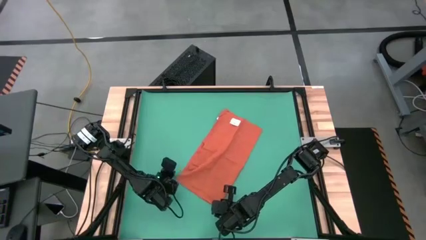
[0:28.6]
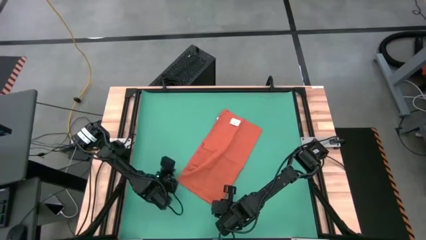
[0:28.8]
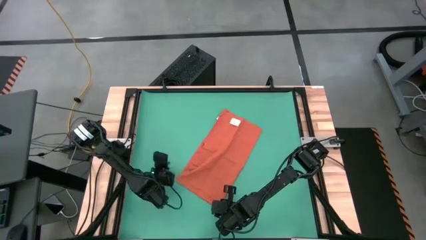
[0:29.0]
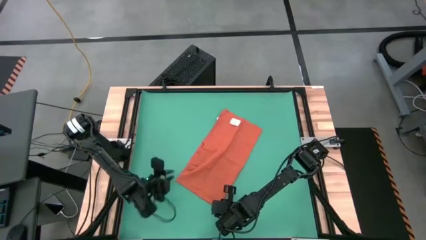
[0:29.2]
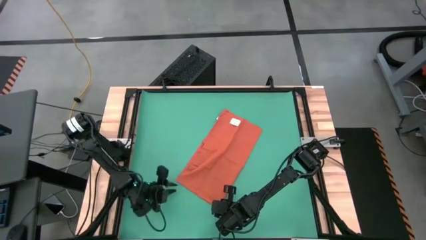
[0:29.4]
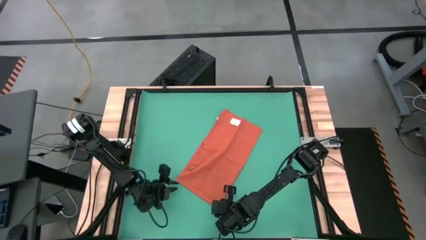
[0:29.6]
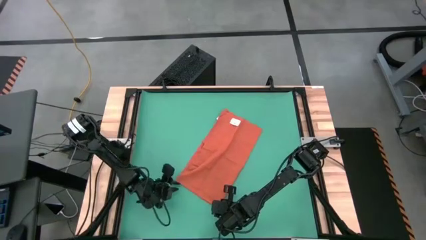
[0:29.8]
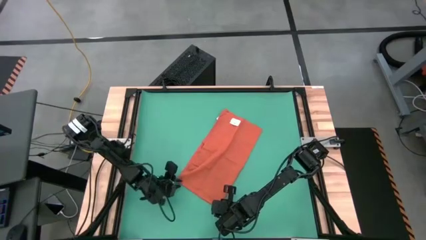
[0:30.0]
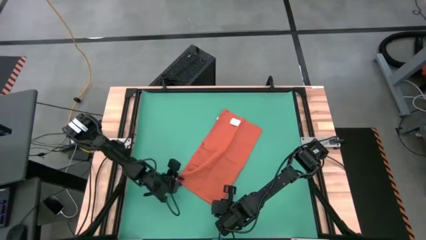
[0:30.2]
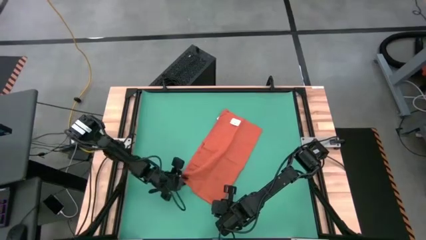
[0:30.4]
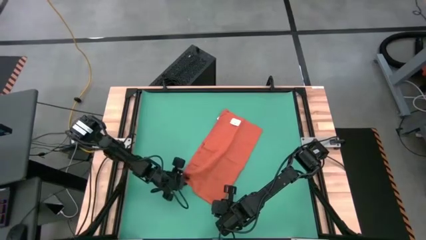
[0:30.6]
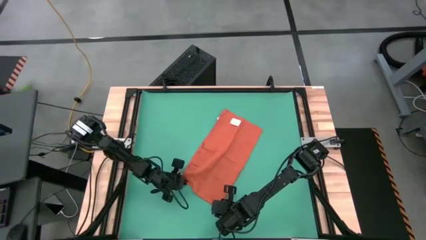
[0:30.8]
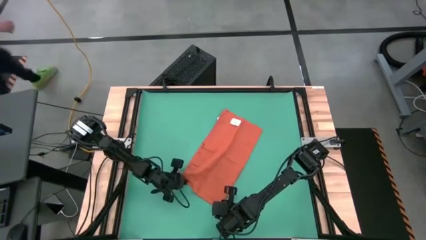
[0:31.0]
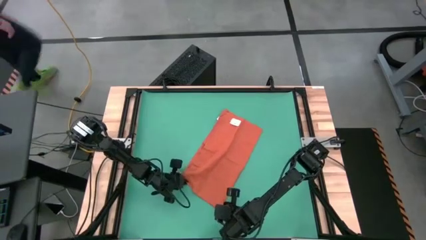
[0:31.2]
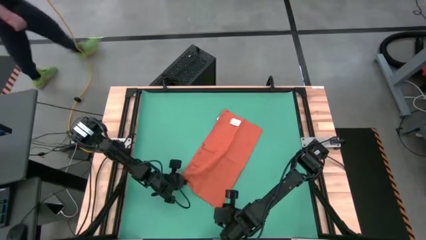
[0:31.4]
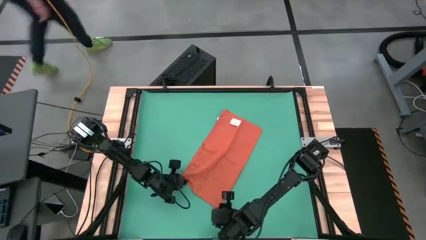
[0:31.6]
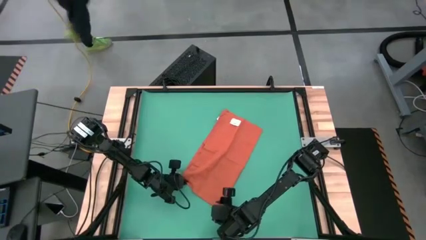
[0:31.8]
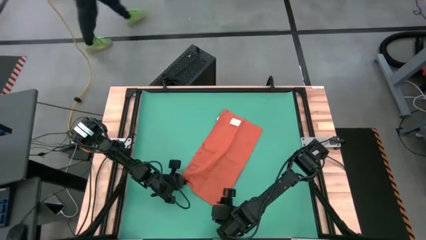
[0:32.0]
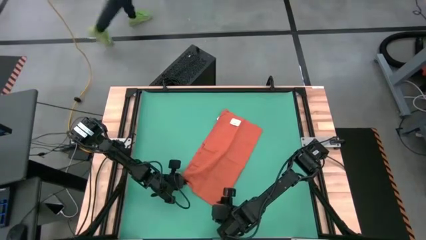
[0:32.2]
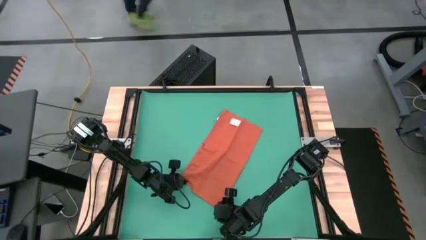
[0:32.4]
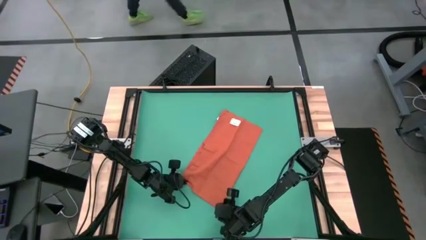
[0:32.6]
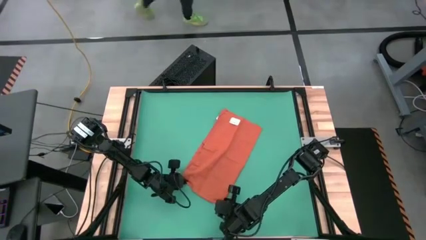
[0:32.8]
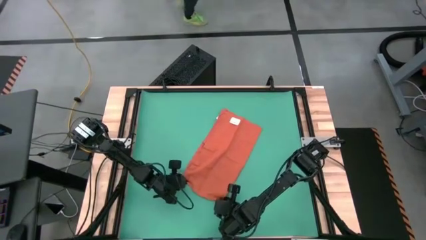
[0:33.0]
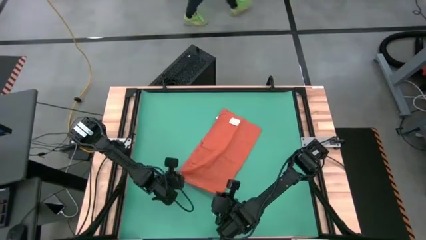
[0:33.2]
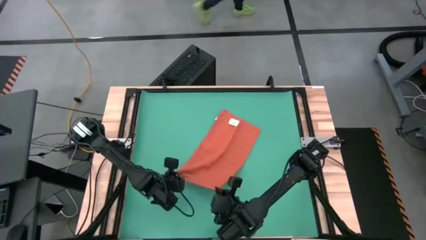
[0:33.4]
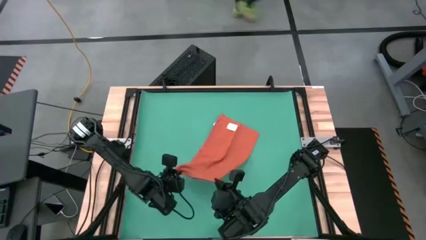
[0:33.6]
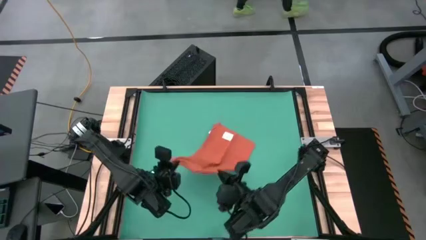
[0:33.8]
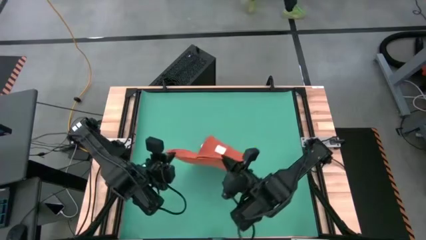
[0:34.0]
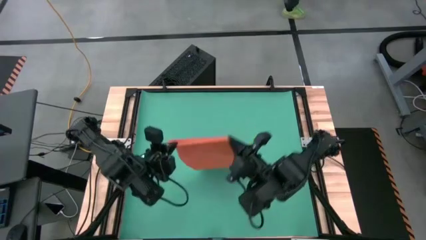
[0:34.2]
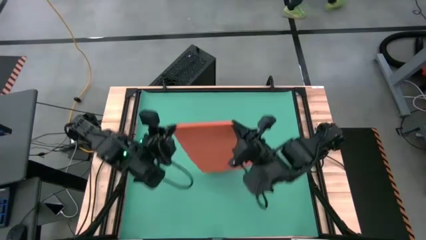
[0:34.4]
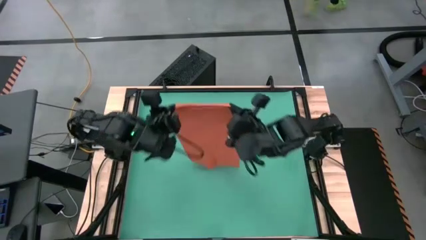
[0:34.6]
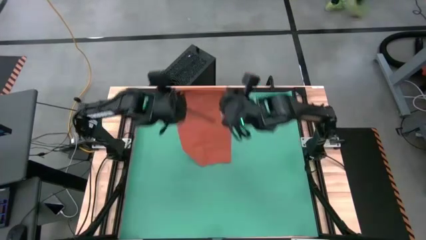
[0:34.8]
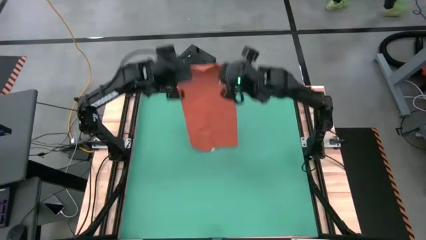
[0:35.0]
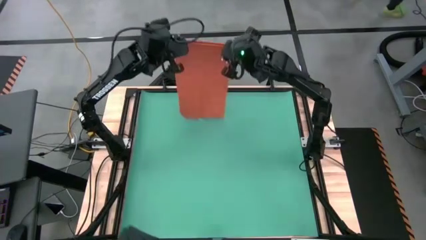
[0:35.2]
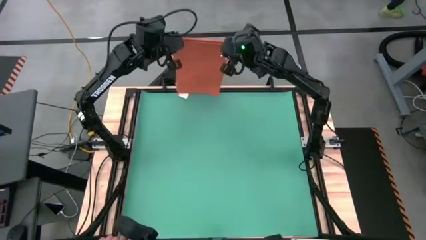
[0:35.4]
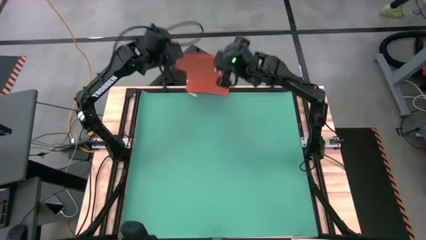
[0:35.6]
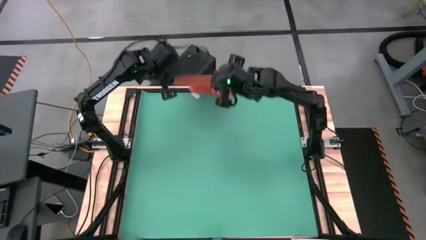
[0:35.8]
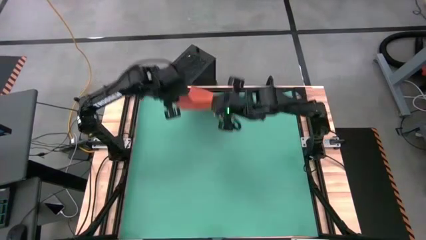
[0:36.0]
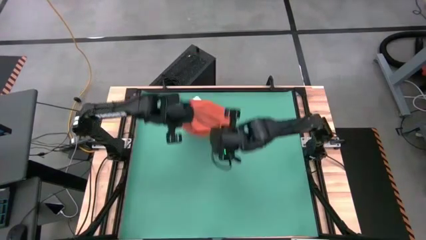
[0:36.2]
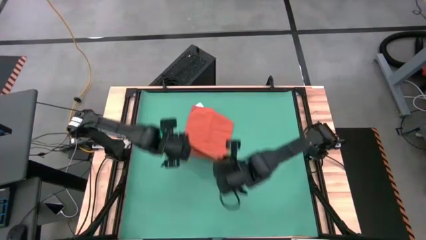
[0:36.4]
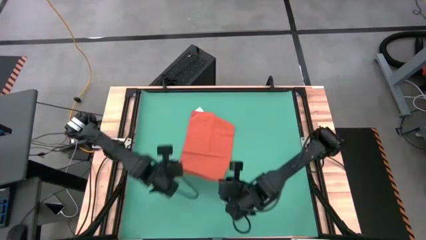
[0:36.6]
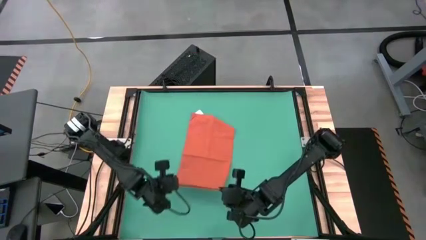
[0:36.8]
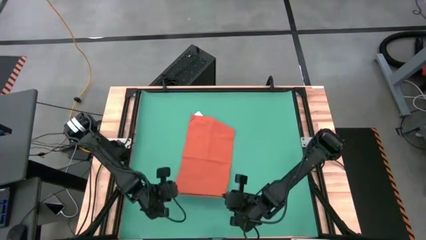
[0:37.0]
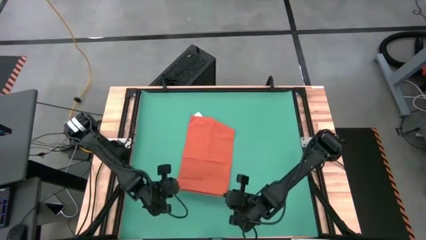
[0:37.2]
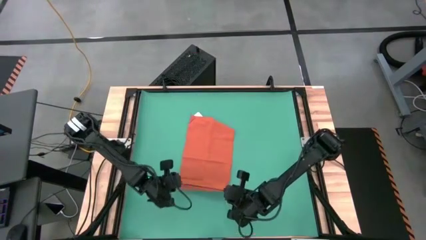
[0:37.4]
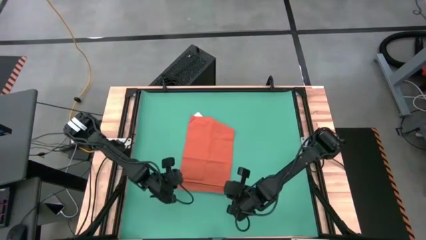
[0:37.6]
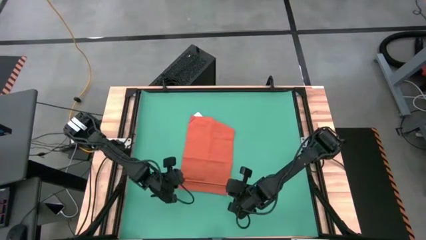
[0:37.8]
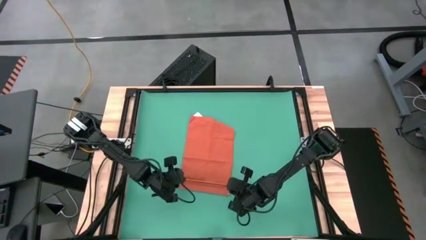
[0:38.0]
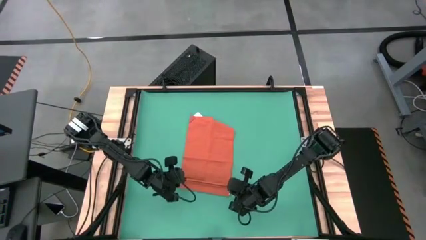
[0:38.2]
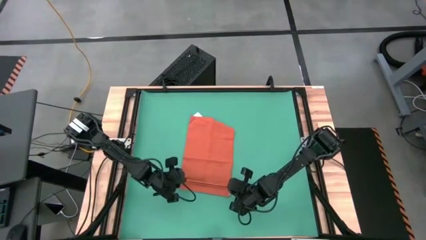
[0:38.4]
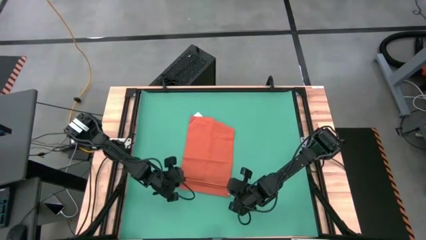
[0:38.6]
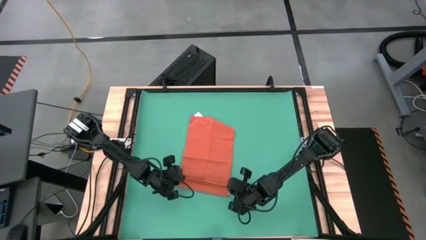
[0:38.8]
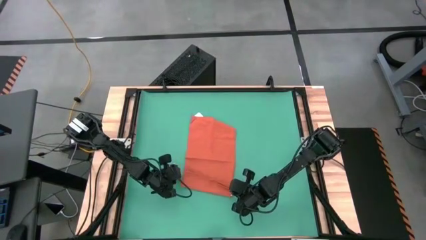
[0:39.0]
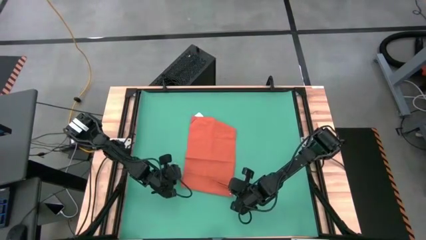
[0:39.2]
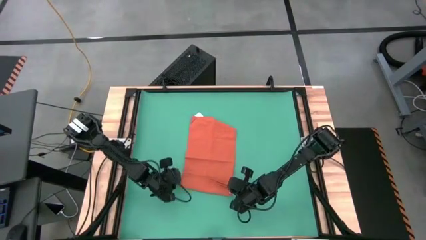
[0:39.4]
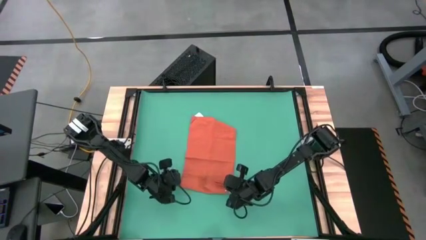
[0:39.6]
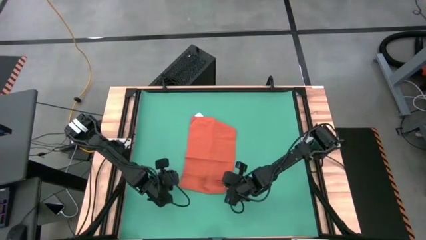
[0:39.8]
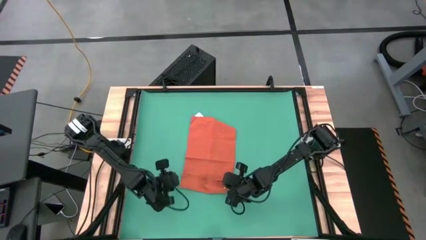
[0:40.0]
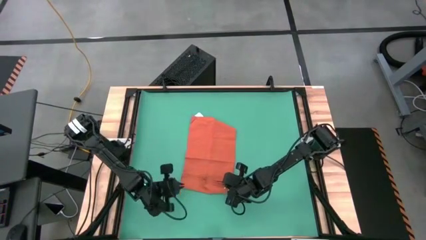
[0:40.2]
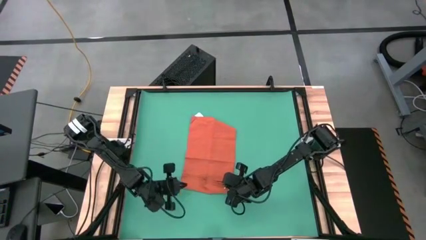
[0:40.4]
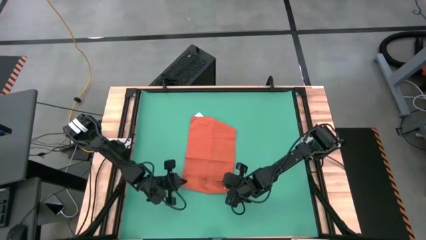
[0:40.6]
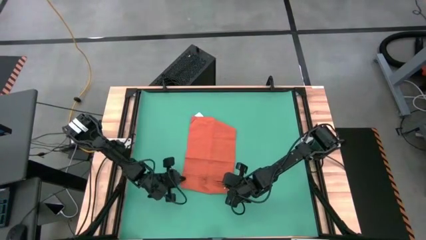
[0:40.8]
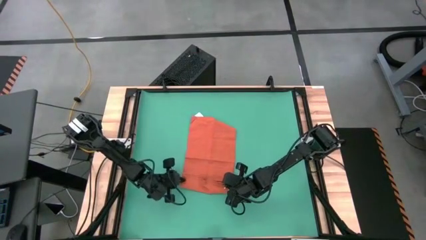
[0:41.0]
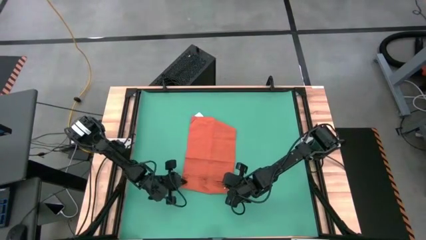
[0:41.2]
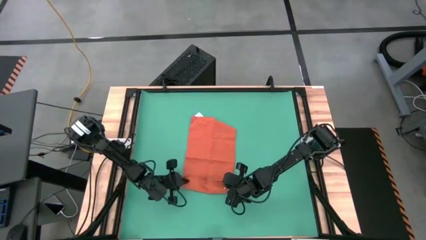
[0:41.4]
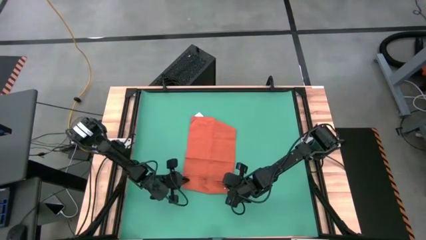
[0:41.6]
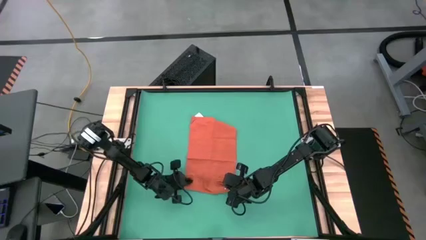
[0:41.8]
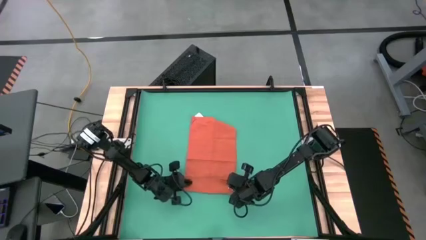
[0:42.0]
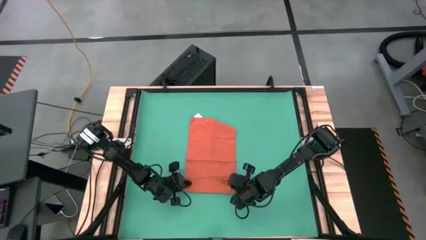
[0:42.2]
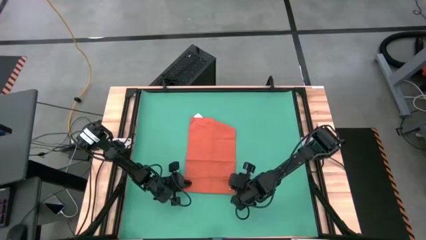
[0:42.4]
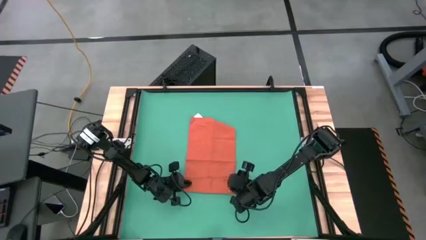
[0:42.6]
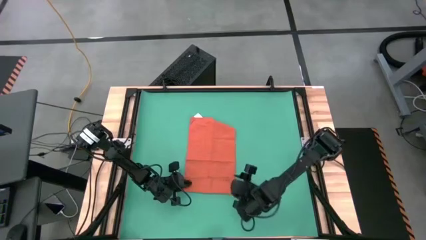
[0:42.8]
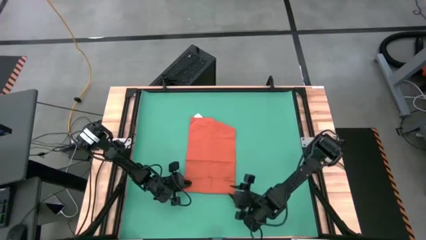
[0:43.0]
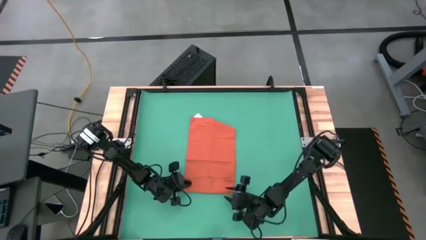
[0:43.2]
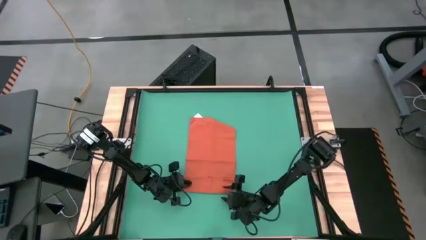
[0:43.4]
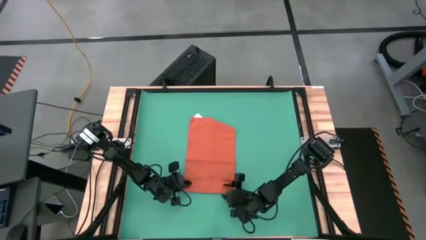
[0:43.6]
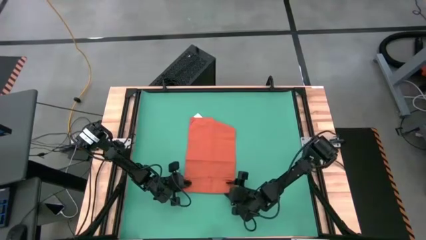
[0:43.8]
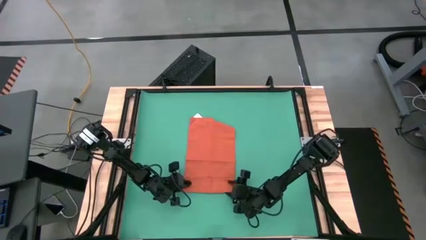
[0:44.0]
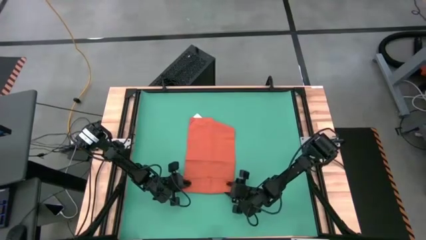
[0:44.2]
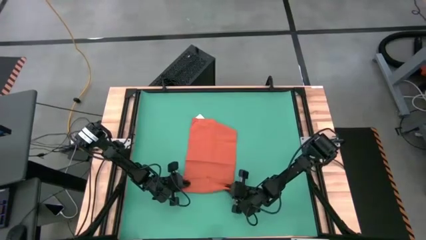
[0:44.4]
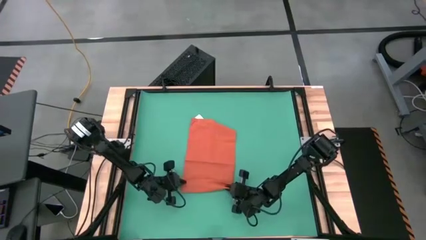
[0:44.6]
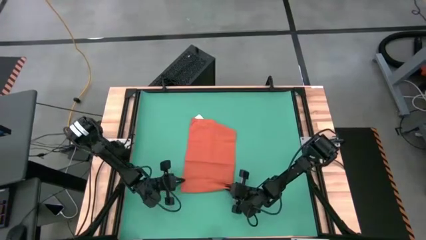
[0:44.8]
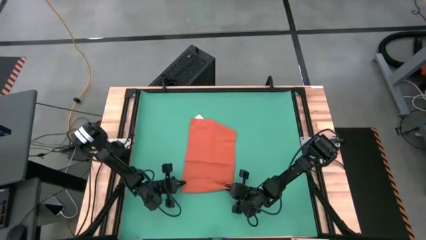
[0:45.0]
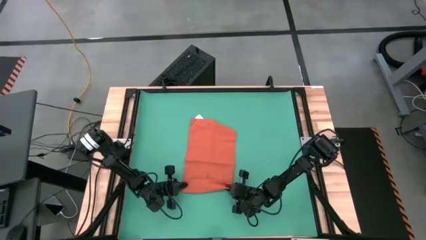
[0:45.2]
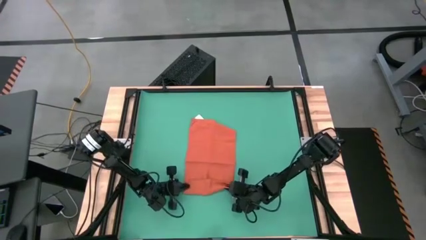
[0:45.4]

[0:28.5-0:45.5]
Task: Roll towel into tight, uniform cylinder
Roll the orange towel
